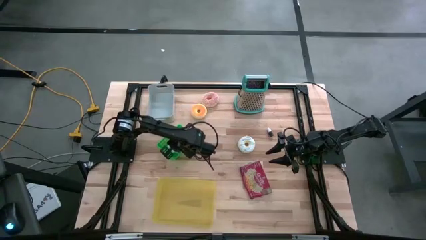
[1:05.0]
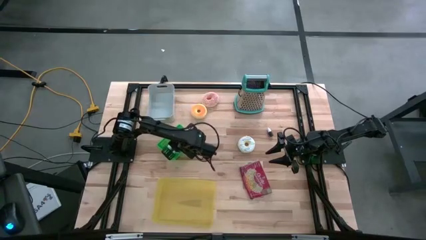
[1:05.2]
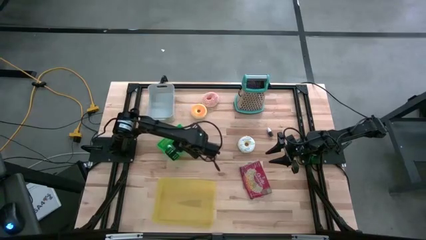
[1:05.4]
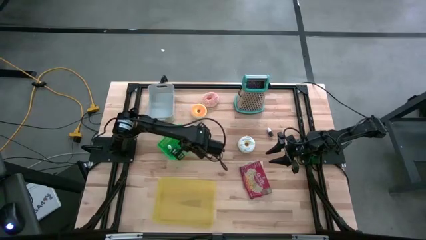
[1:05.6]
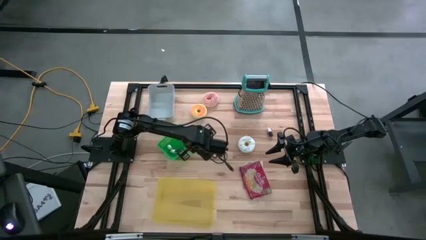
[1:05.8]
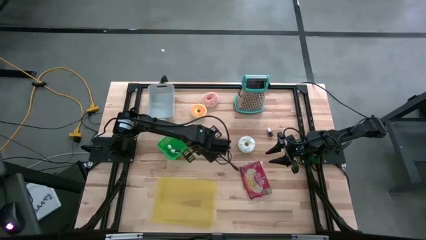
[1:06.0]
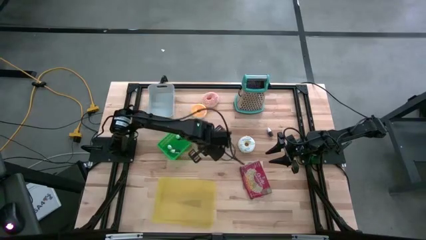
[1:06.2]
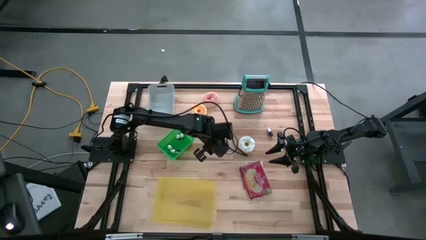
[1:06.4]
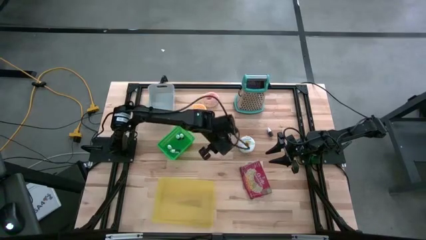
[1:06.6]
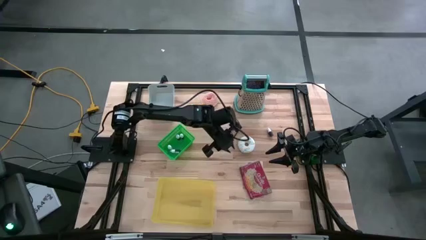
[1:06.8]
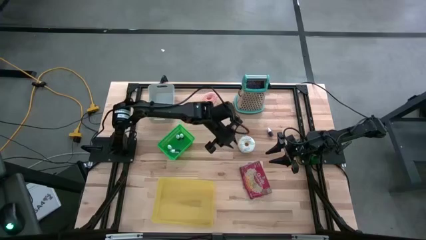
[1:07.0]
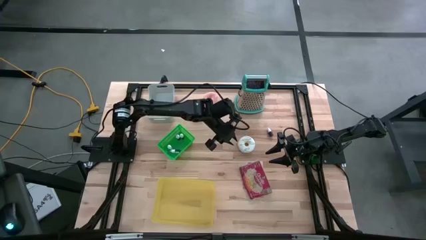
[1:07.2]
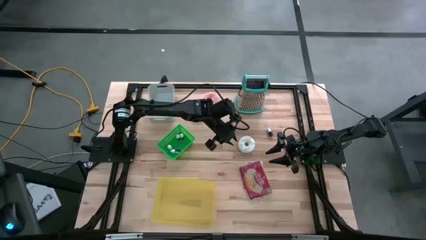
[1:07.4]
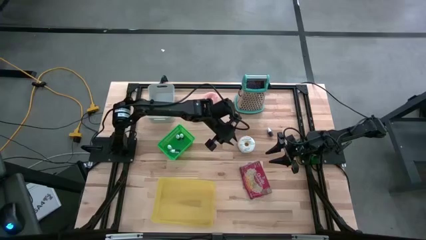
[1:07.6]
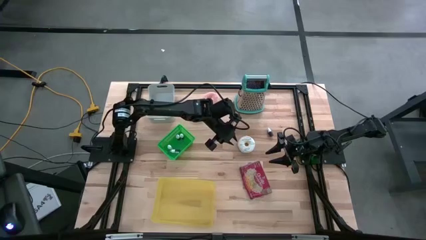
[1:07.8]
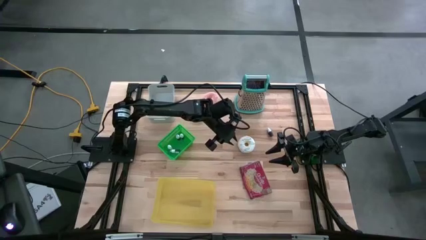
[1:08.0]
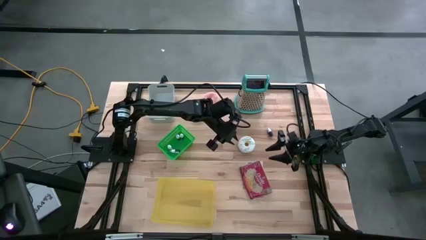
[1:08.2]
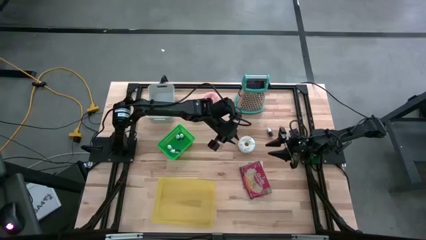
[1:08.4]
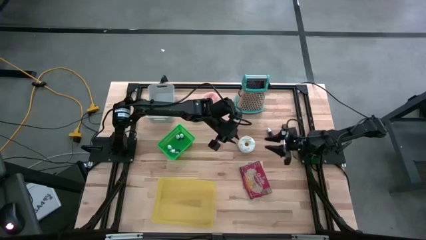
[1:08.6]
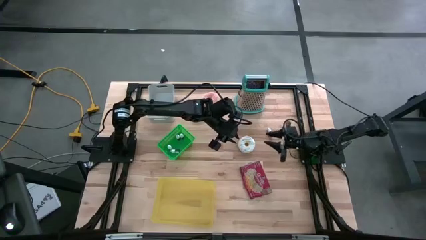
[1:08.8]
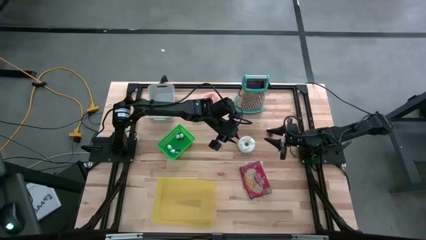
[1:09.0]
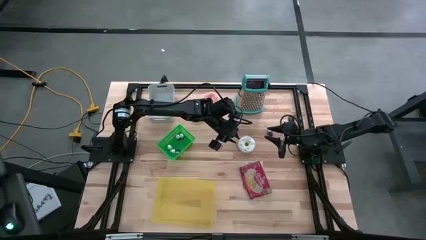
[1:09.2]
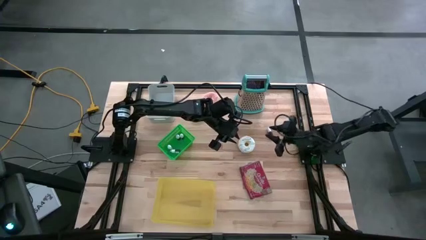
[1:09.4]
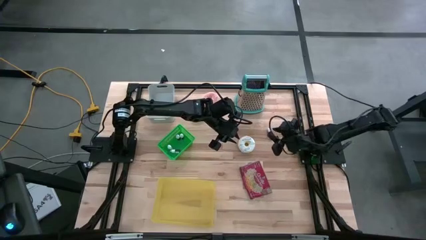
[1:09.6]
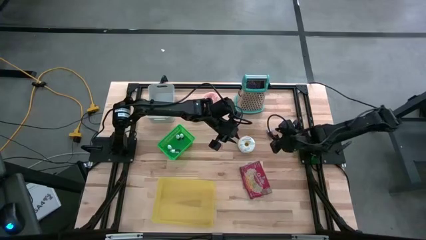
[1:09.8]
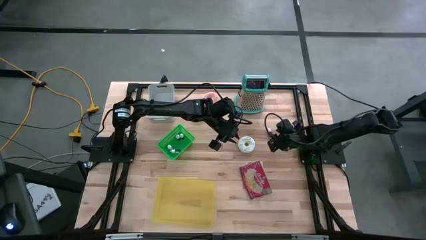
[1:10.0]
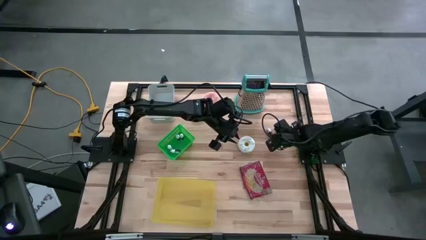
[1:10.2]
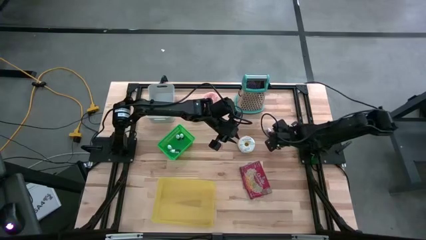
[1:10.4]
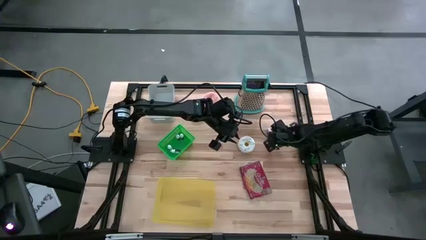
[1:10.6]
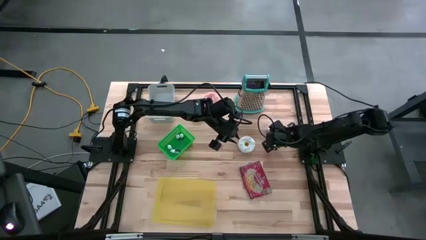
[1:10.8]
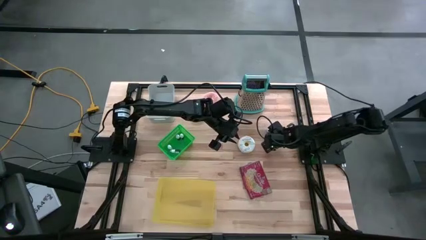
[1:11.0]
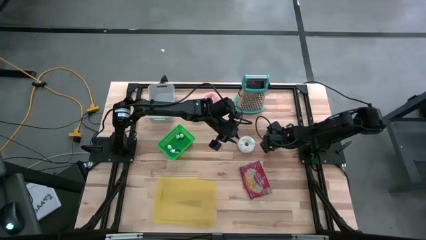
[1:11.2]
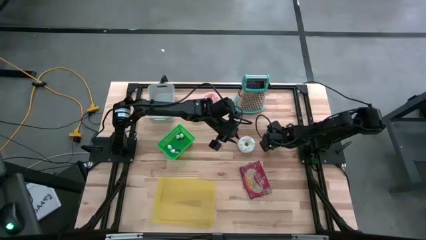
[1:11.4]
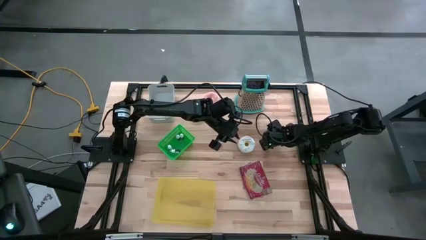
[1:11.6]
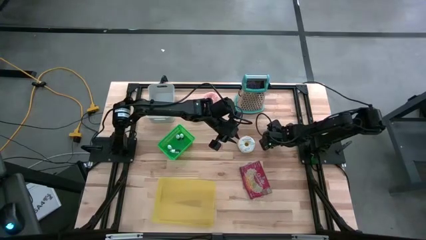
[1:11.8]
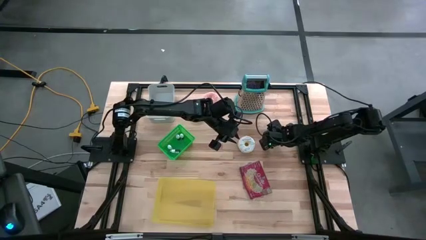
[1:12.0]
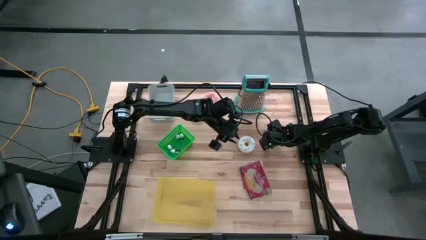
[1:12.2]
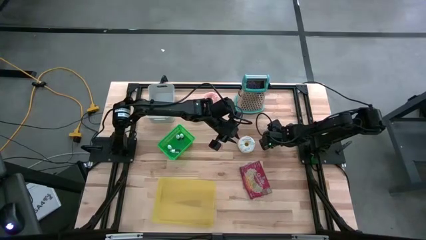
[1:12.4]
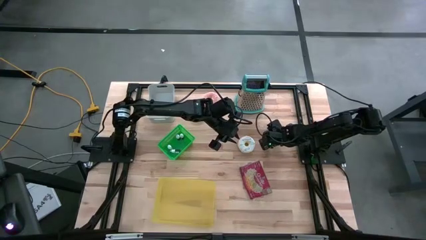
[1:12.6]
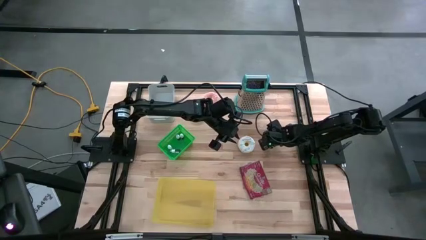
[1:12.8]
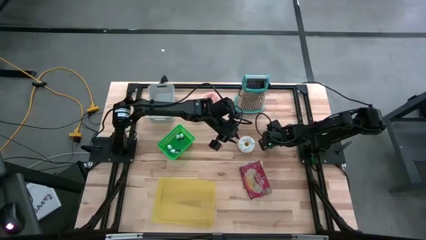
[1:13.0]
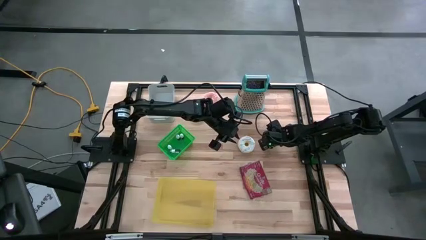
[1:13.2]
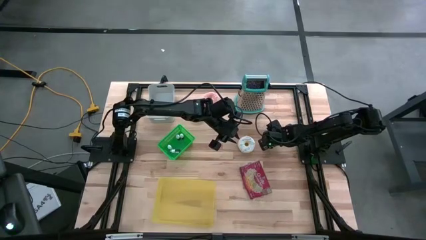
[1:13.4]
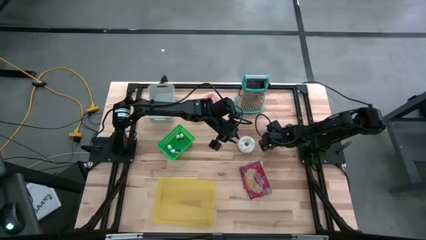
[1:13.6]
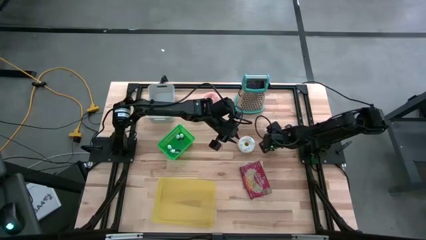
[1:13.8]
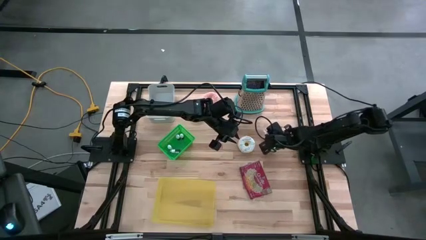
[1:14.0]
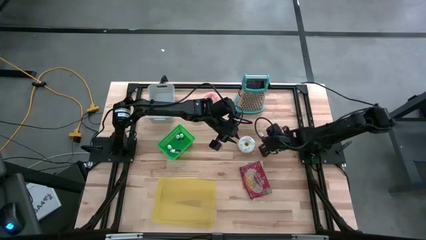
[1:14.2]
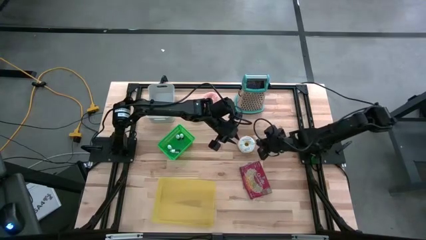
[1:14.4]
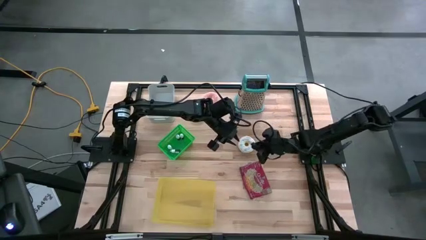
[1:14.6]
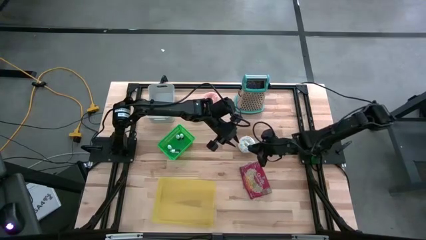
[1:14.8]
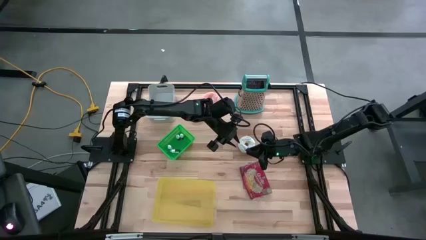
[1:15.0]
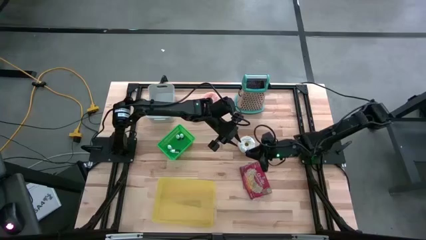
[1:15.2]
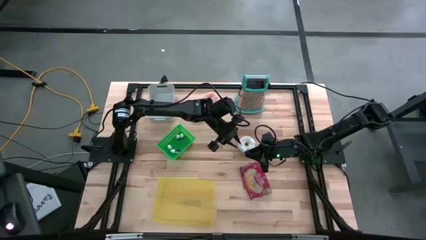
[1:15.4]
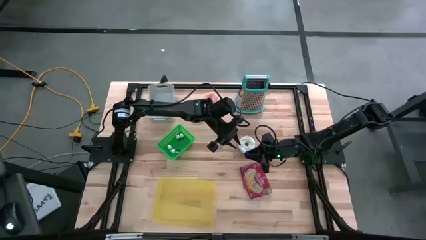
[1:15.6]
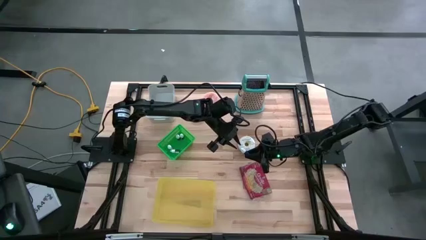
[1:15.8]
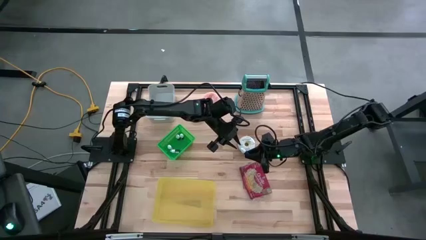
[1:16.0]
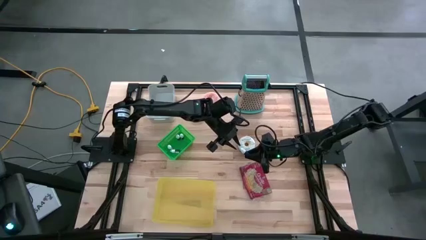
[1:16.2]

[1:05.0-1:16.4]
Put the black bottle into the green basket
